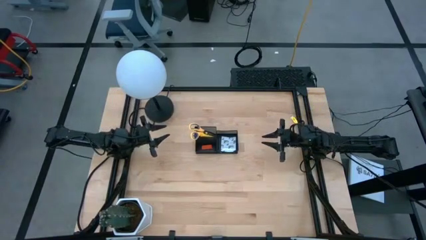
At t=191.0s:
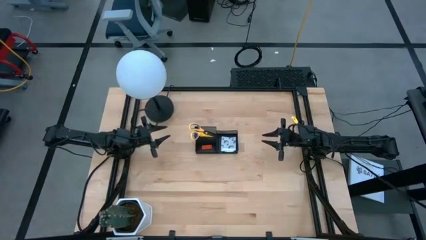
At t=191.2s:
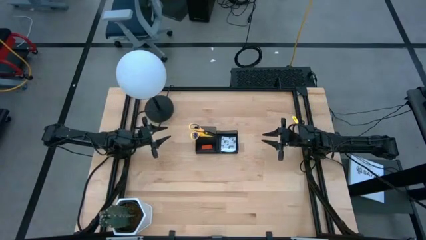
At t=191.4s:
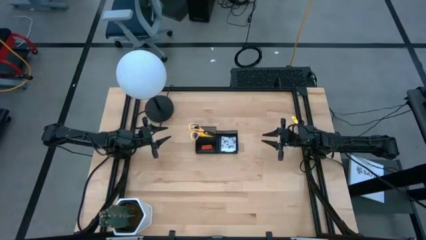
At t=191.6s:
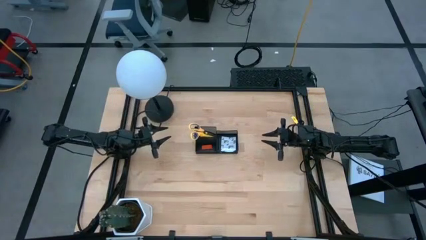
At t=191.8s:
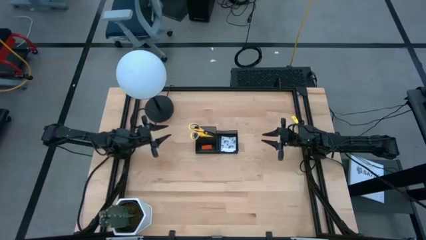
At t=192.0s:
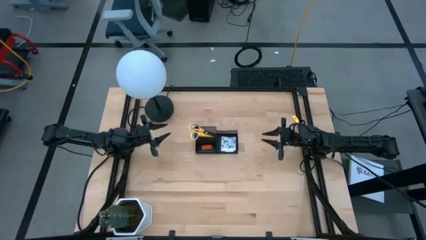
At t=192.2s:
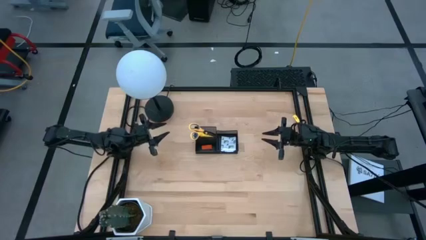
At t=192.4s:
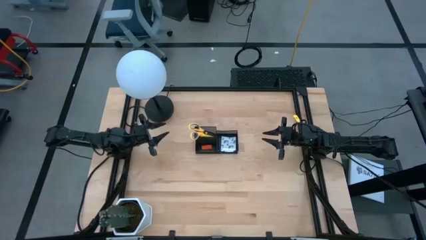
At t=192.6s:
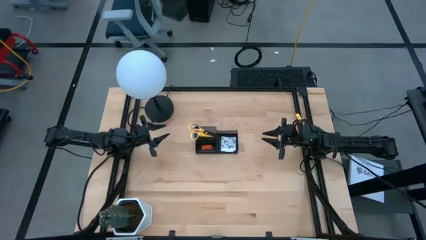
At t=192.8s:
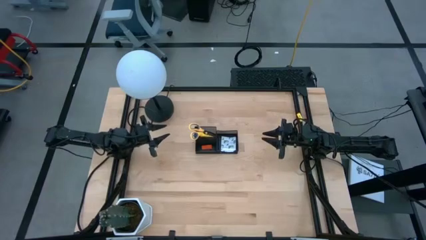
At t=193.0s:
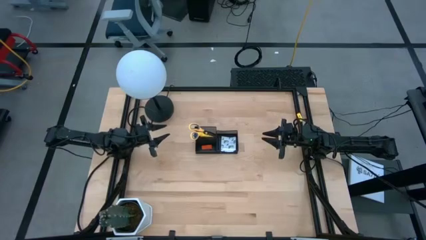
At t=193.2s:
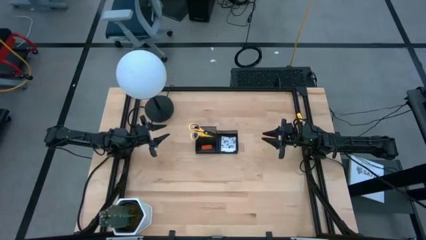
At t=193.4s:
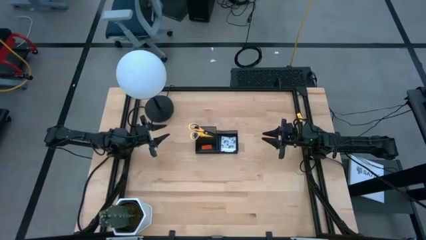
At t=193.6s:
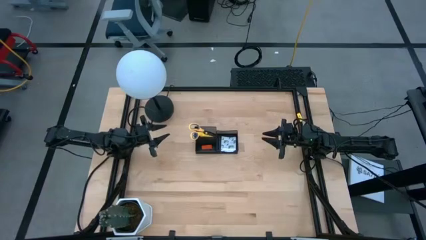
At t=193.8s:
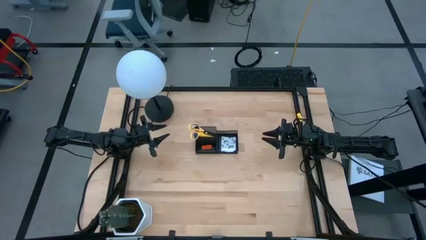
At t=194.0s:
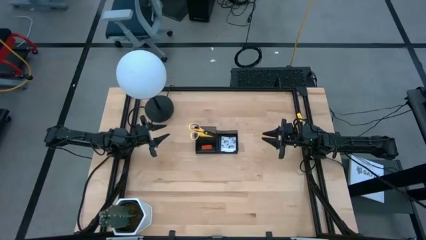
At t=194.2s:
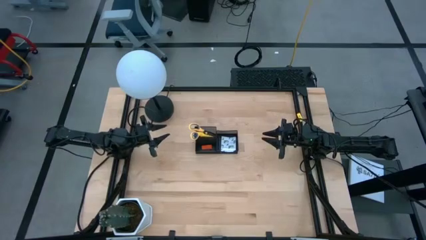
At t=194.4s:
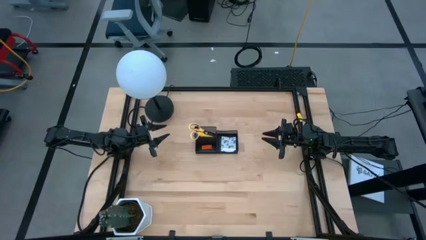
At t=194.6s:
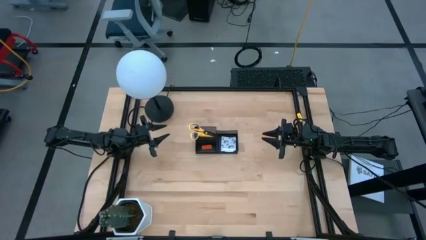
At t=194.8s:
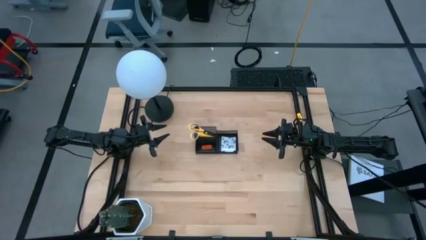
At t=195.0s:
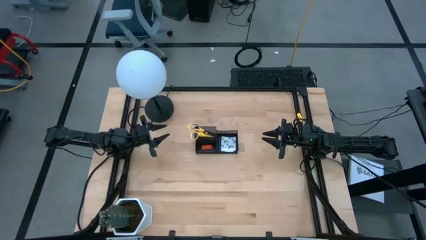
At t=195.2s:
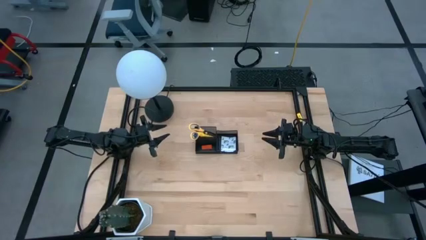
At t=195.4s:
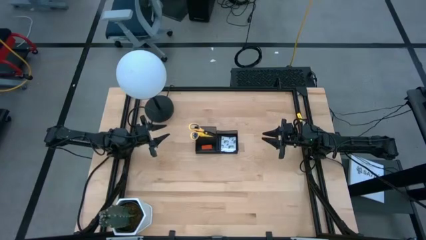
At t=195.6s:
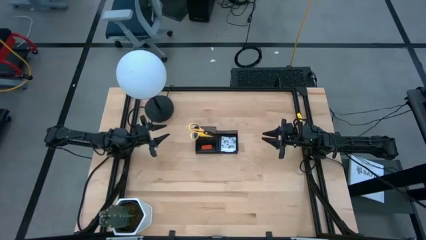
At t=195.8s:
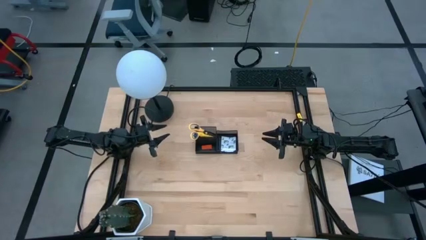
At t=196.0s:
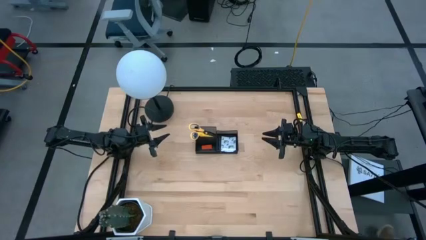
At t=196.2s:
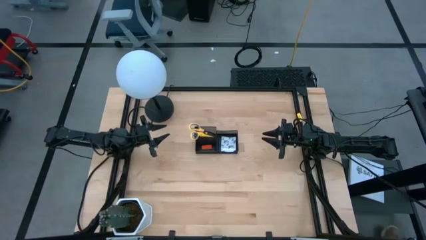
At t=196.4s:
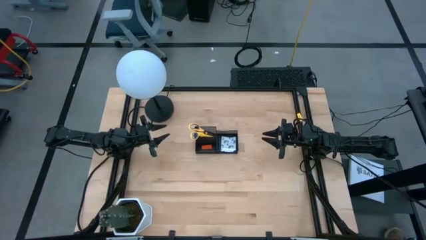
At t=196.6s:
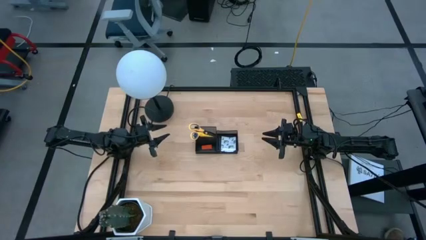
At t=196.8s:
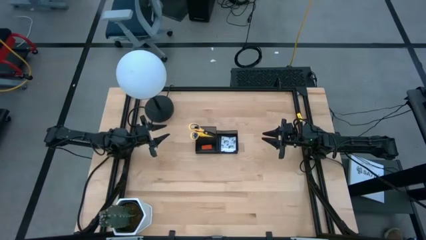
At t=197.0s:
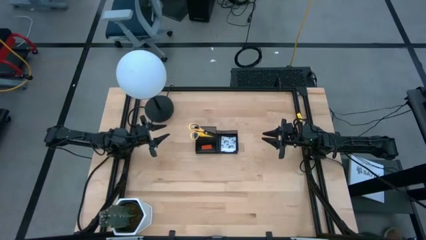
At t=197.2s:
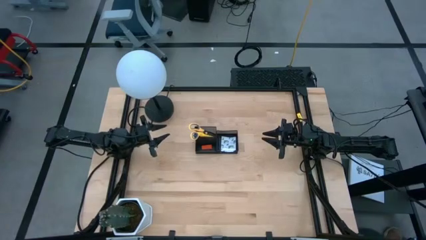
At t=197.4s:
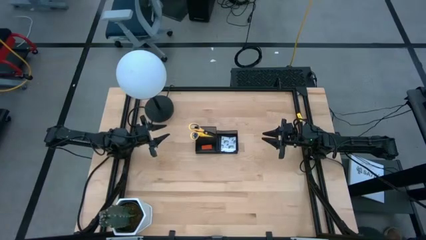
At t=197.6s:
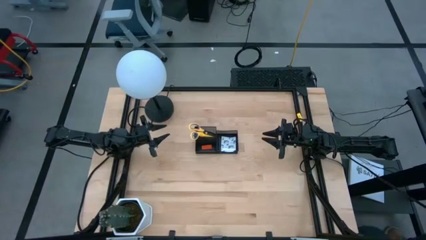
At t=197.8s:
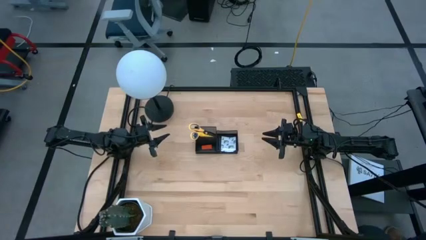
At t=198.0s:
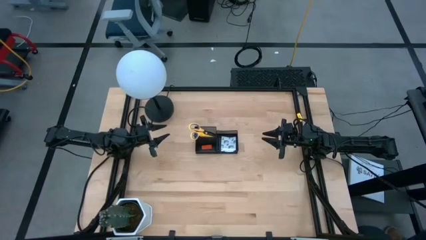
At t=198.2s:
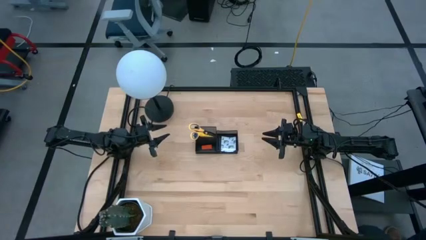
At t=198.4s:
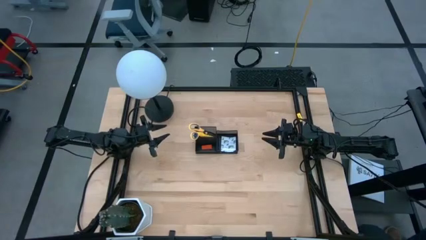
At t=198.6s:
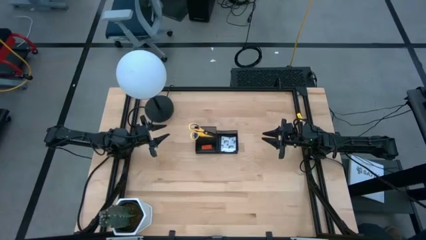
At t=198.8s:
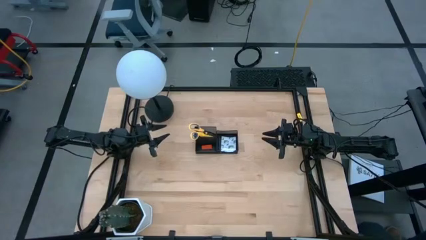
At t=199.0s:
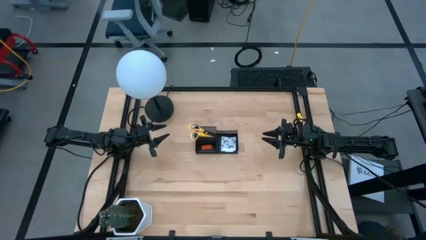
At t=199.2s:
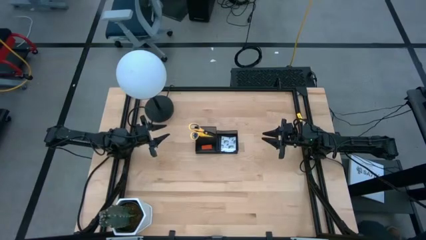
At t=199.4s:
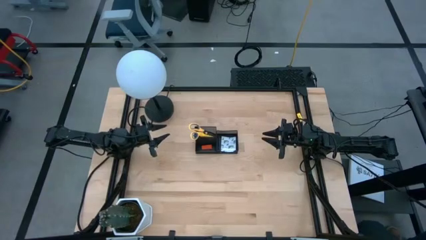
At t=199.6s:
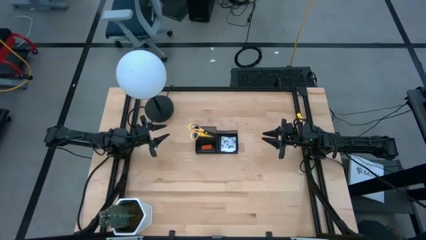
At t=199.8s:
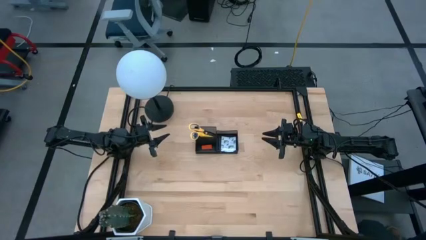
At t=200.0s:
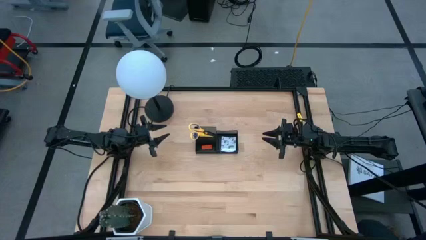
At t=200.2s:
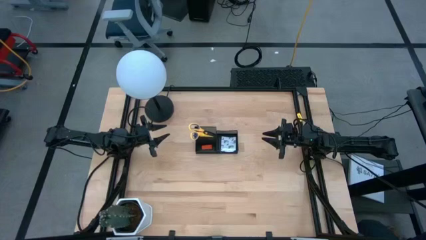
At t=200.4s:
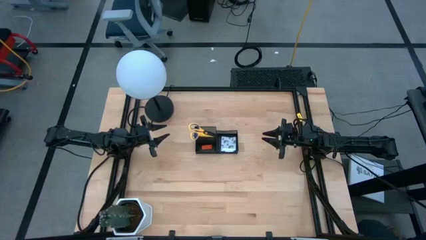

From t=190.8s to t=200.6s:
Task: Pick and place office supplies into organizer
Return to Home Position

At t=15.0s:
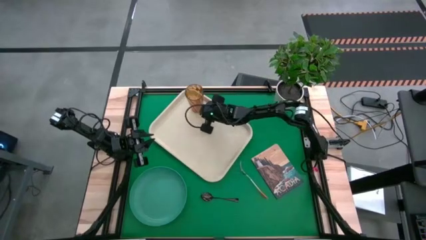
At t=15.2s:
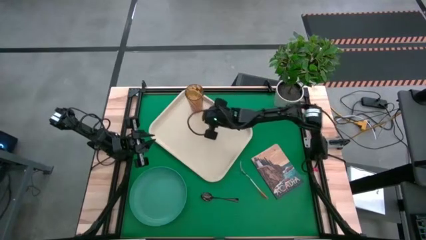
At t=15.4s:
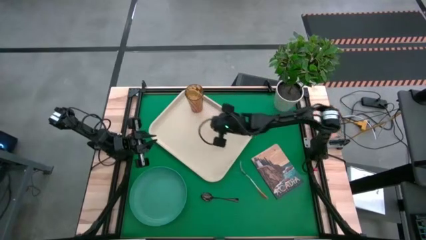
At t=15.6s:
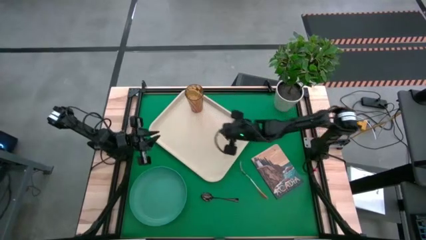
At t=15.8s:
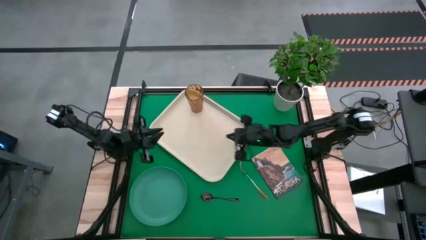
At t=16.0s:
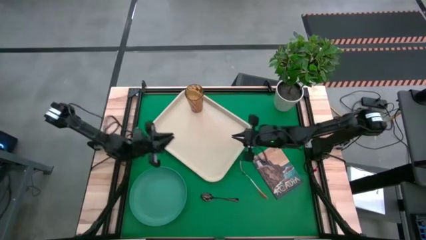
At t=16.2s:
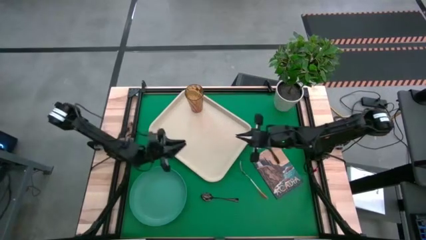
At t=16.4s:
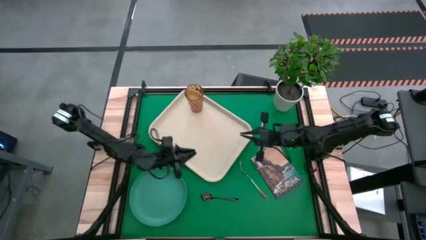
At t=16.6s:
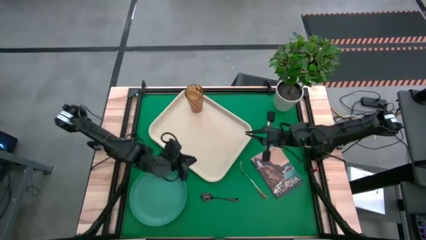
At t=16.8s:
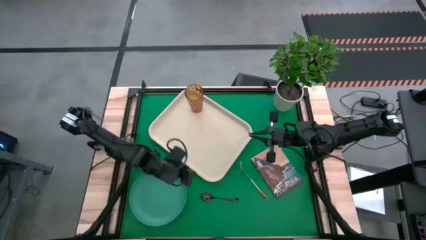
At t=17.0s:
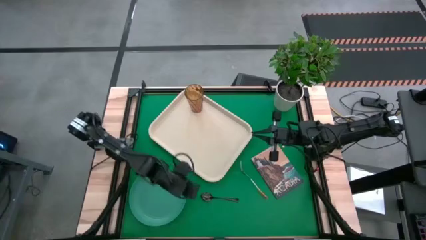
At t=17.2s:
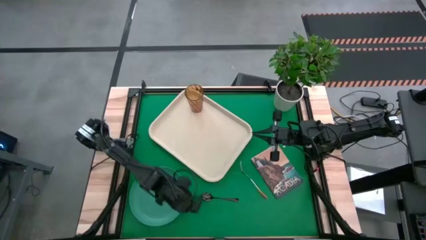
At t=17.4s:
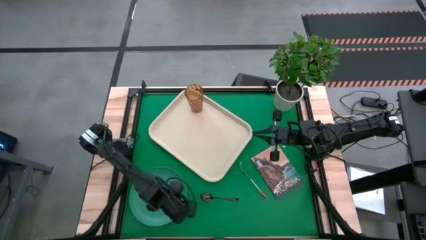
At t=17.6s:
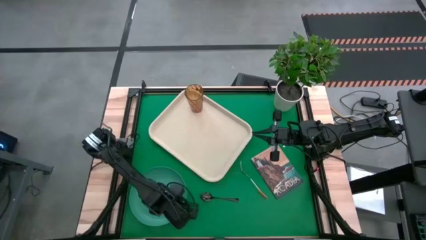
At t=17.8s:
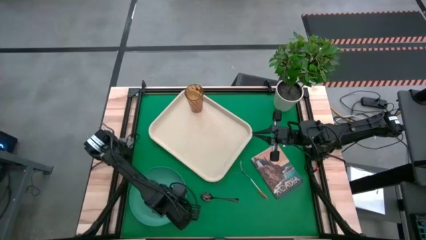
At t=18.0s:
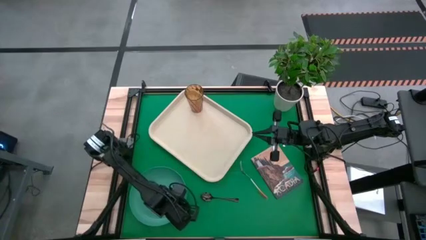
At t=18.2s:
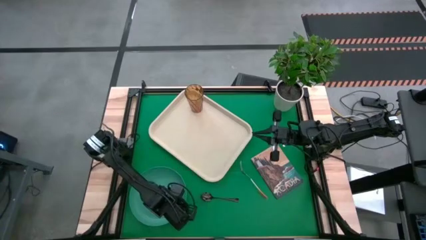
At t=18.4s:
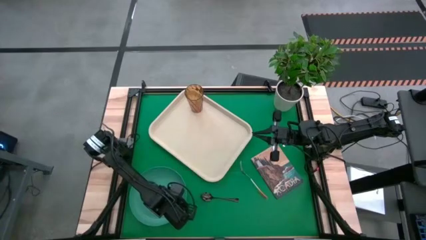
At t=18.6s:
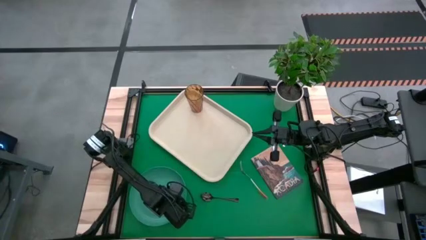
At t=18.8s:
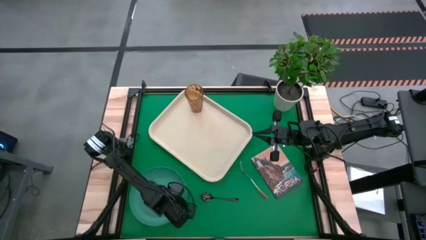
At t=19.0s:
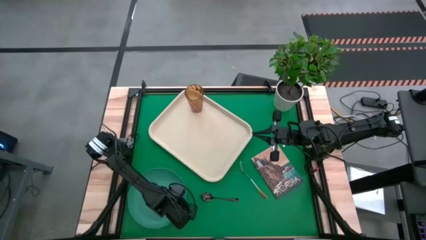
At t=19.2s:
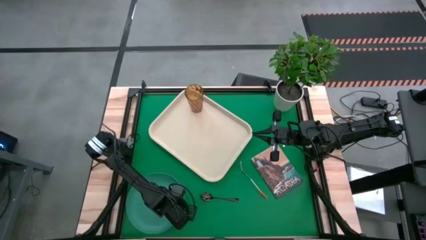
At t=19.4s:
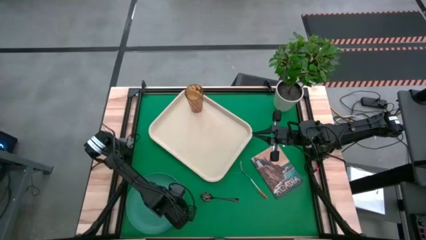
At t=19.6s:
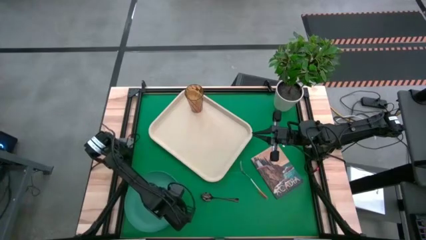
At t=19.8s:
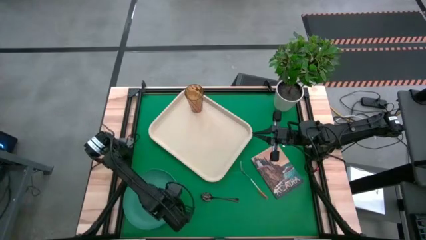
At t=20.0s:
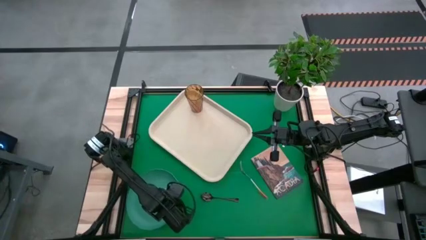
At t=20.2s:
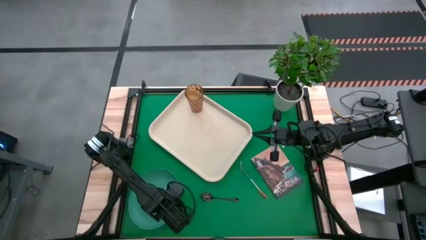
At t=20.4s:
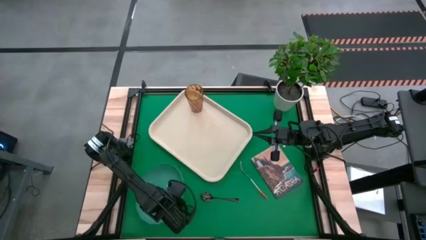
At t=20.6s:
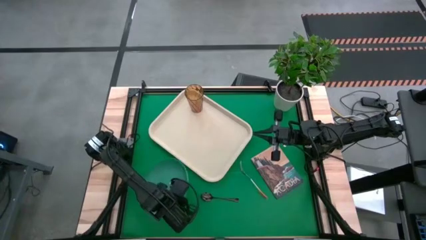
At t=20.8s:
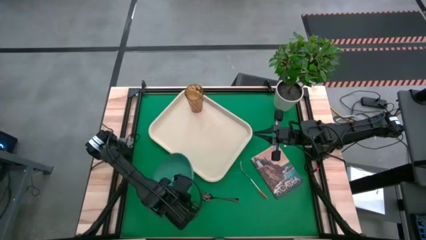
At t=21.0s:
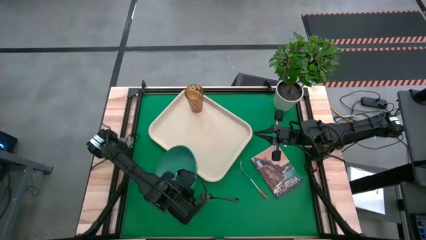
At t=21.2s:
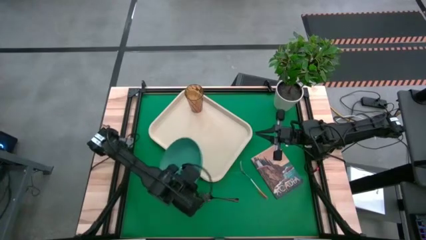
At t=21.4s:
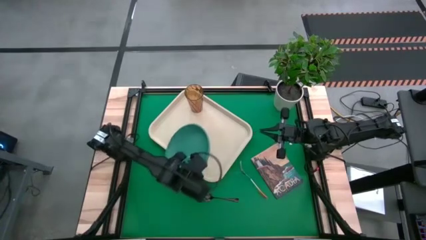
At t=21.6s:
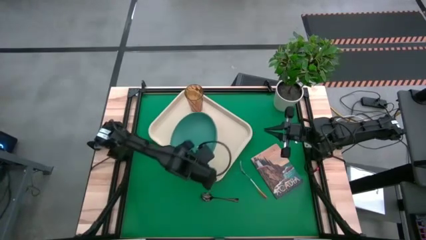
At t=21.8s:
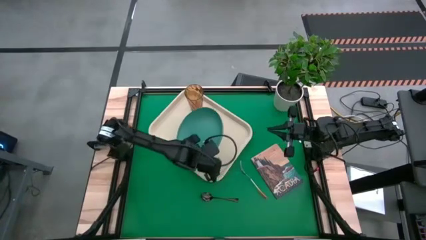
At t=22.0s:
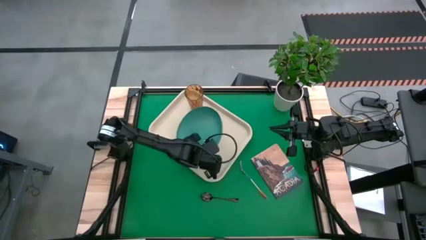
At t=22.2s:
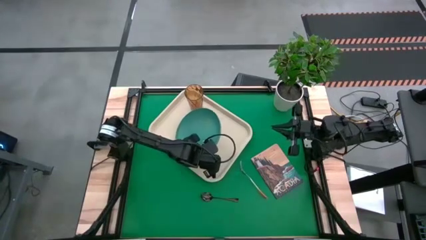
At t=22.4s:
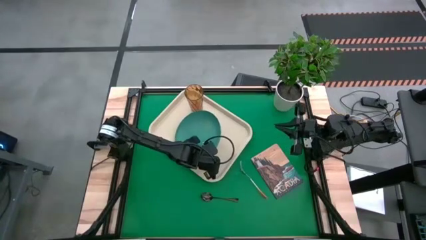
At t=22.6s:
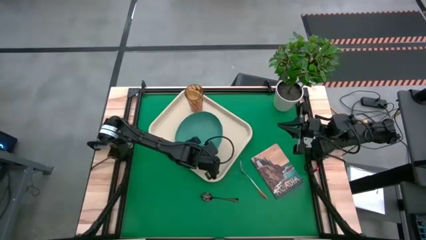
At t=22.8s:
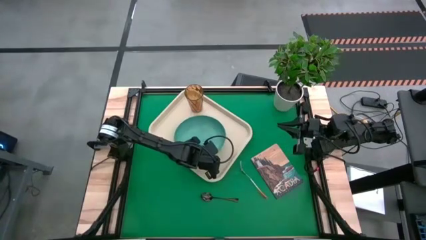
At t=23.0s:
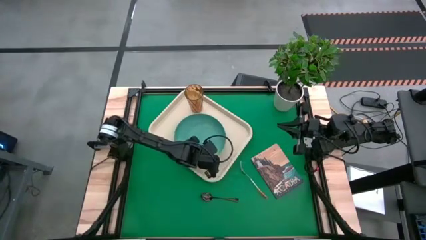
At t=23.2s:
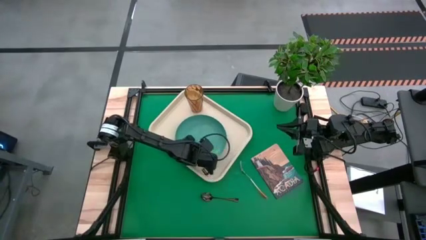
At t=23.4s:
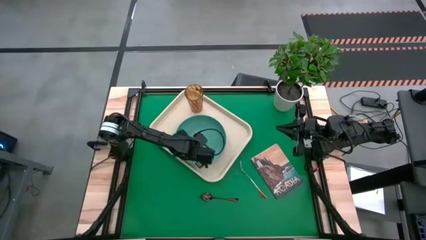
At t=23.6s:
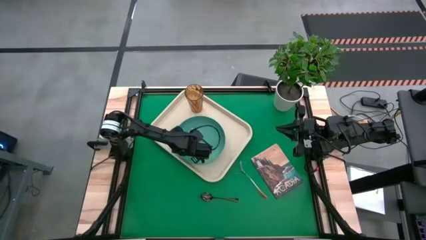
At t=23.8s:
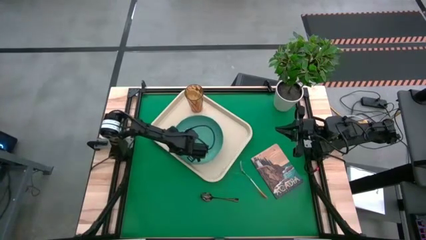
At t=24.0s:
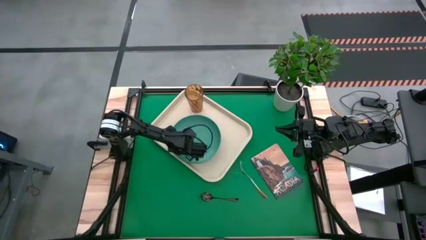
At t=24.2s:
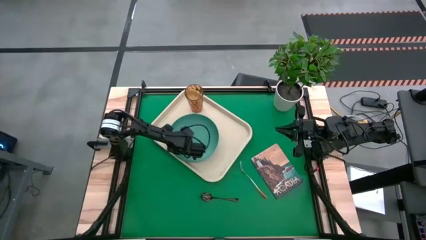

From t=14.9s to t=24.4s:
Task: Pick and place plate/cup/fork/spoon on tray
Put the green plate on the white tray
